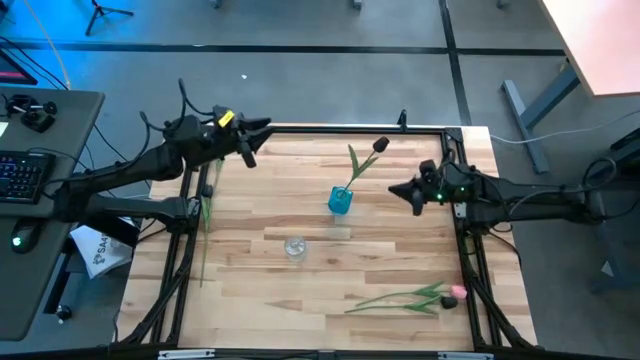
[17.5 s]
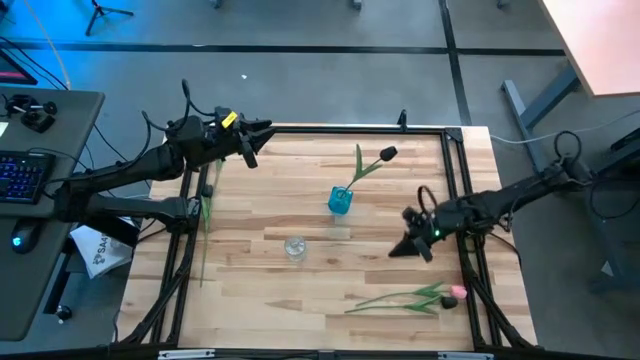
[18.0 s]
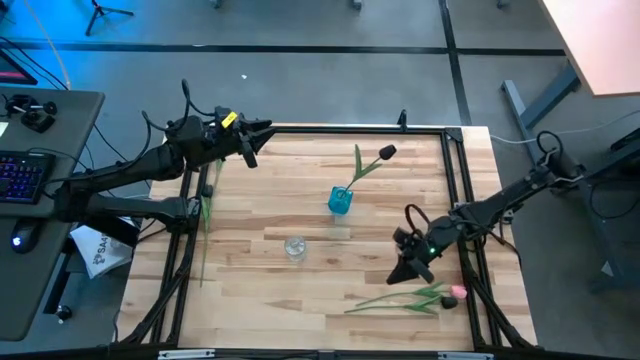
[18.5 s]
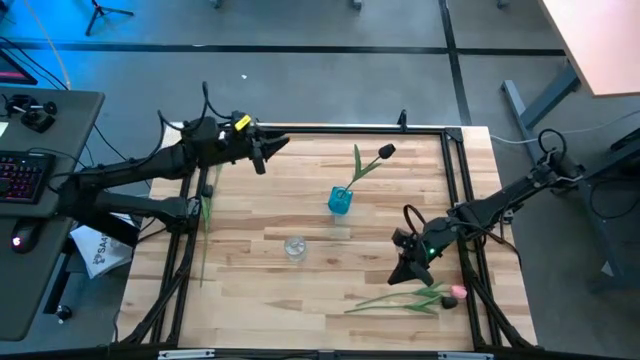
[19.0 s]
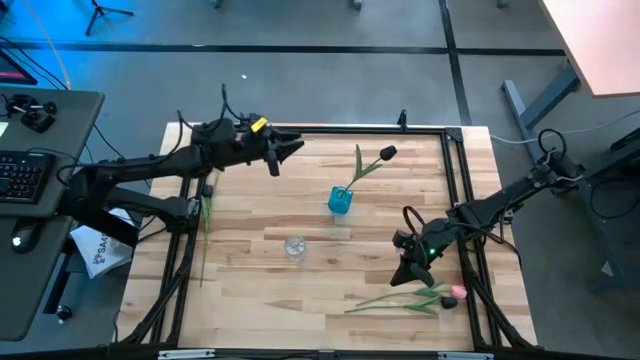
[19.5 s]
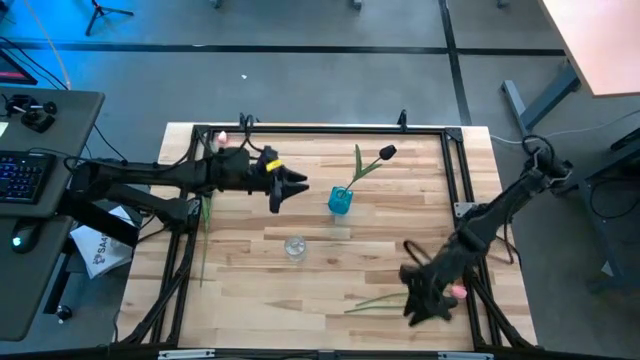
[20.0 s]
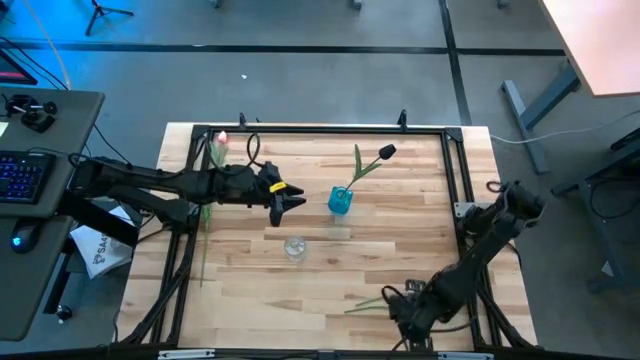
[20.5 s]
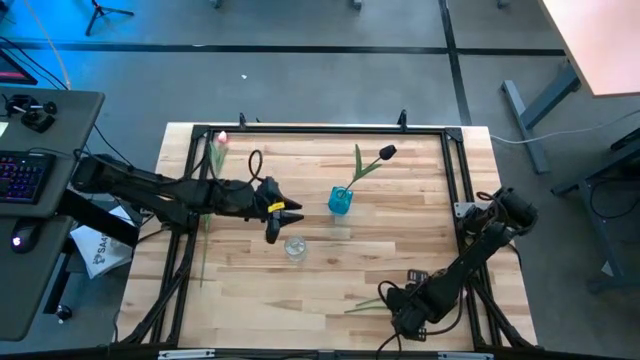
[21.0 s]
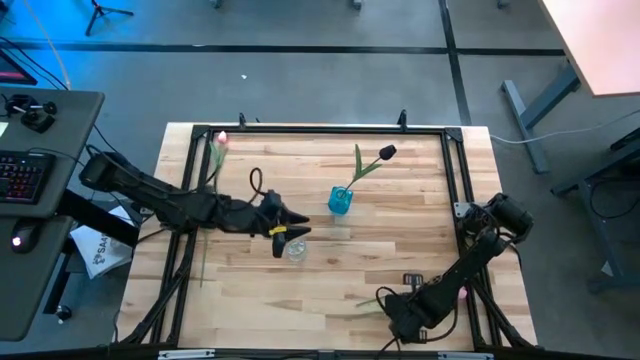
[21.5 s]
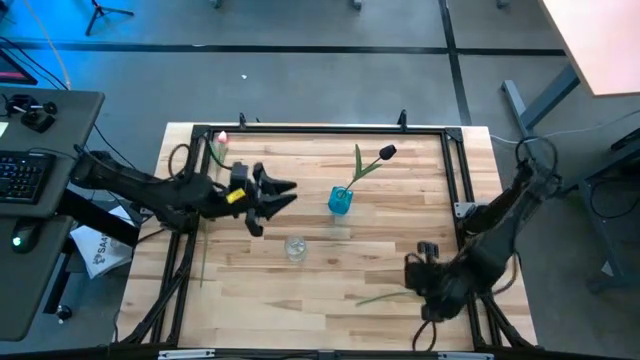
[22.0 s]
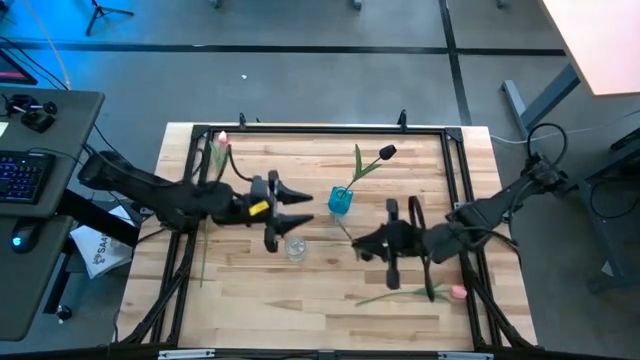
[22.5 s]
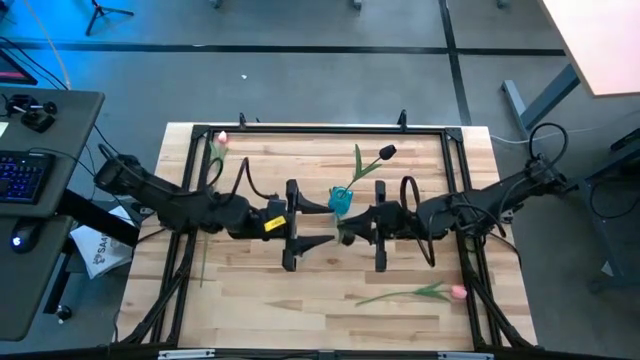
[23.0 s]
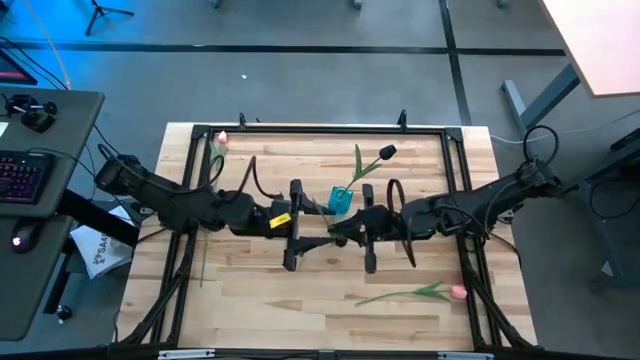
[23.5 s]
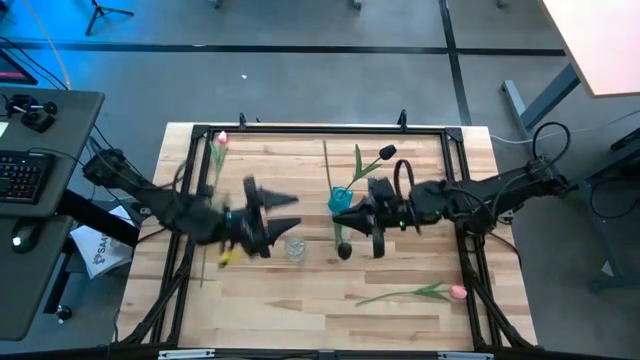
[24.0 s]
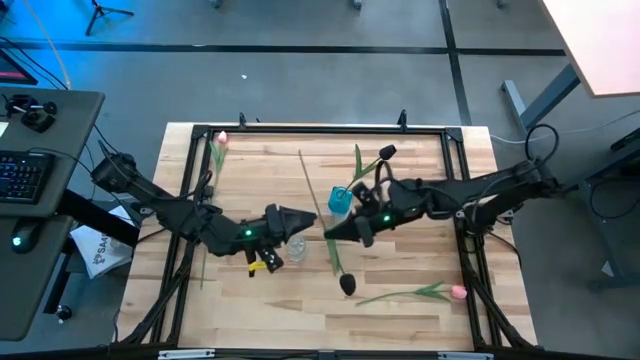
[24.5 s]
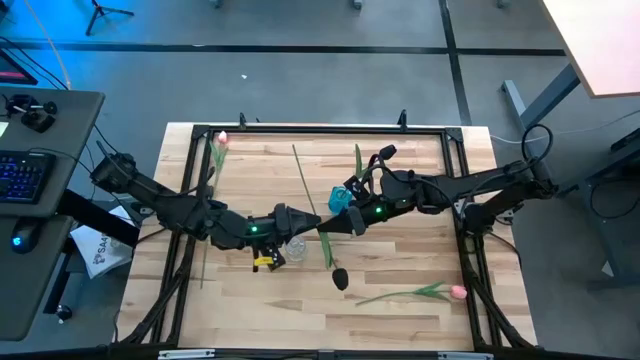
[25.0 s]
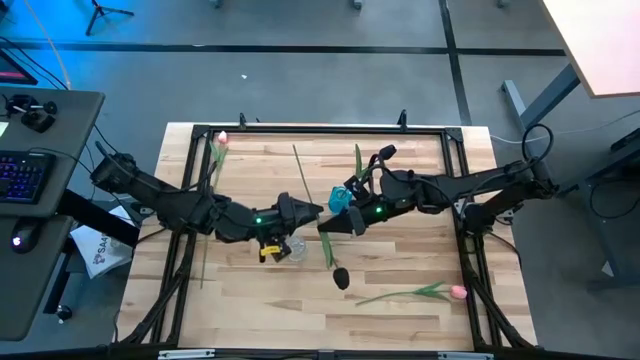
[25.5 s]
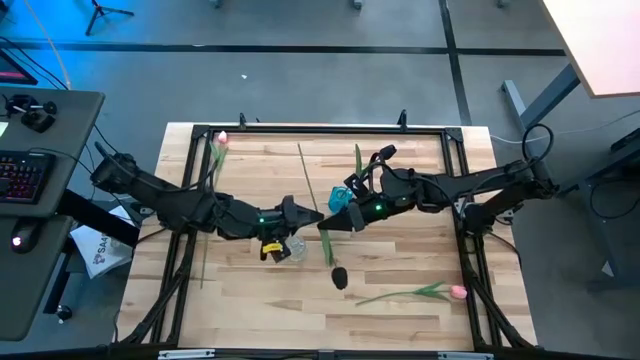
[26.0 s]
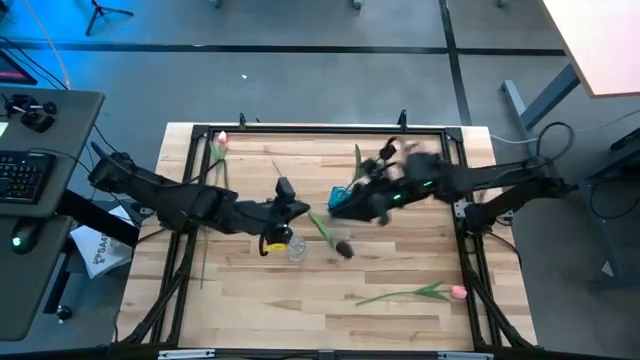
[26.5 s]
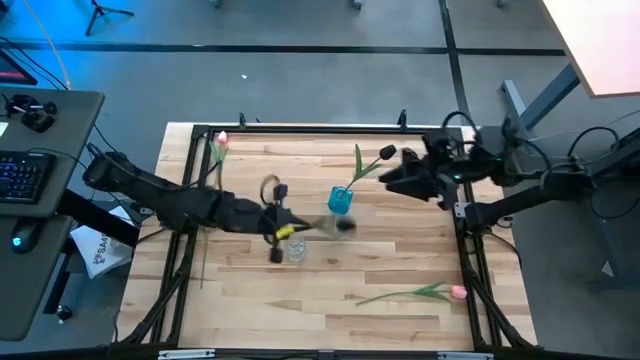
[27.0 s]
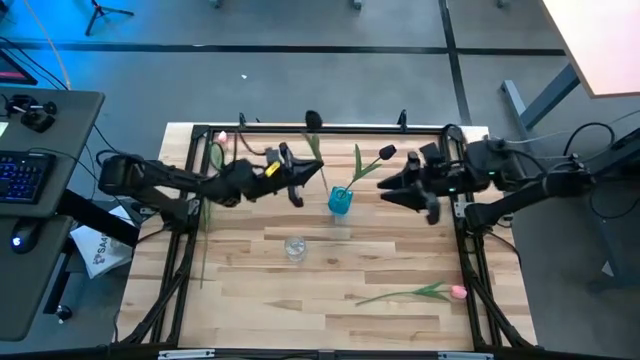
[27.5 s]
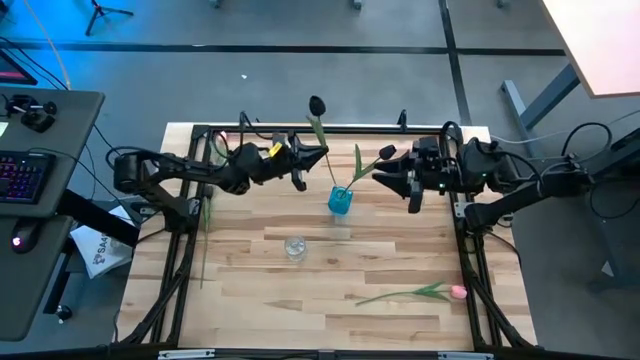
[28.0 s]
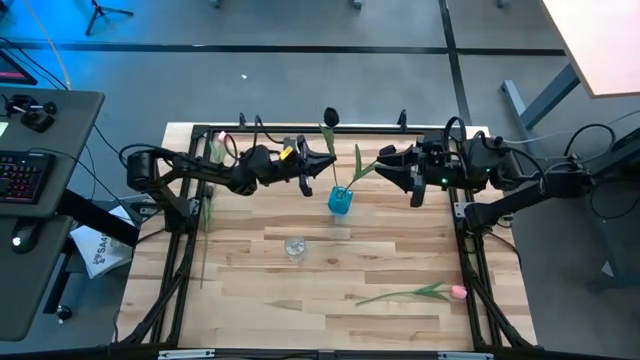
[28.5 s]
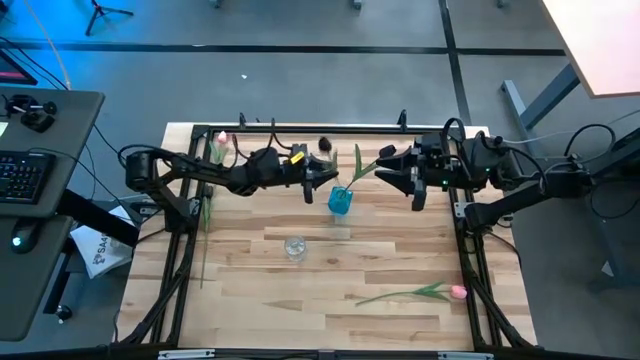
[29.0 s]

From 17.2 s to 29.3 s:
Task: Sort flowers into vase by color
Put the bottom black tulip into the blue vase

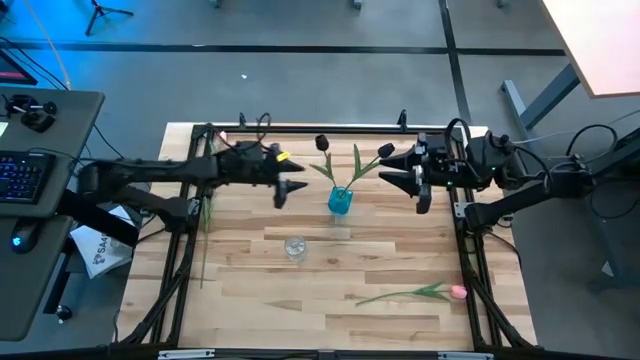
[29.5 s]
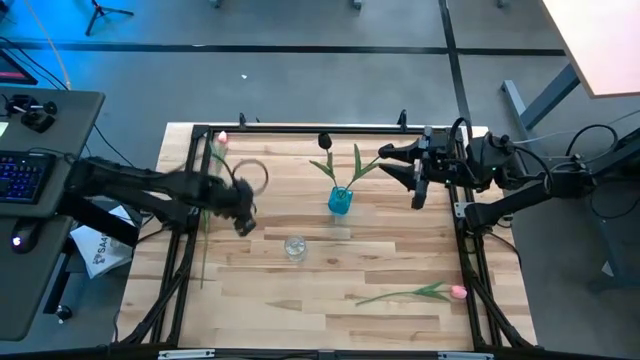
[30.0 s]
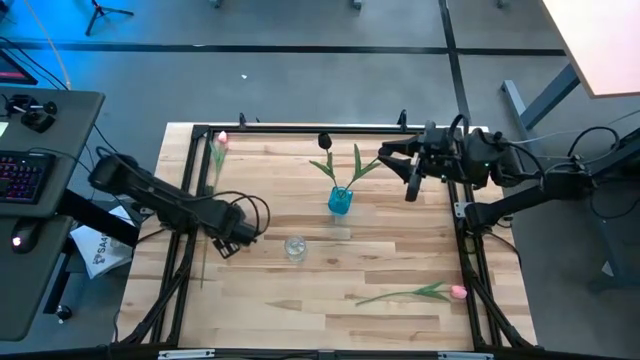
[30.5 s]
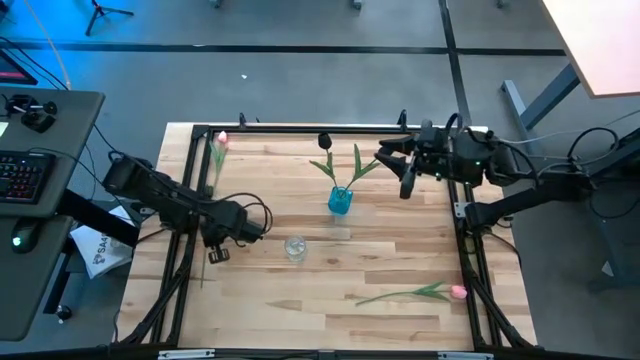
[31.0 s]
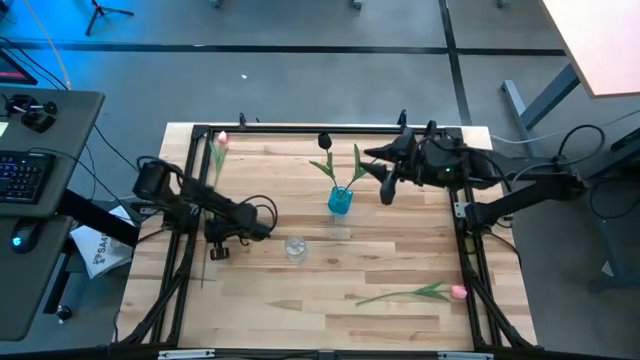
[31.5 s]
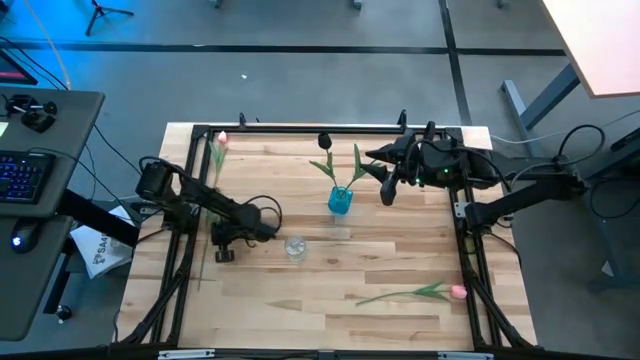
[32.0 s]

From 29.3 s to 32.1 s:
Put the black tulip into the blue vase

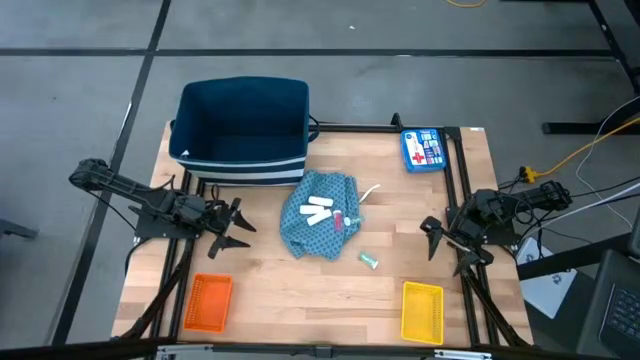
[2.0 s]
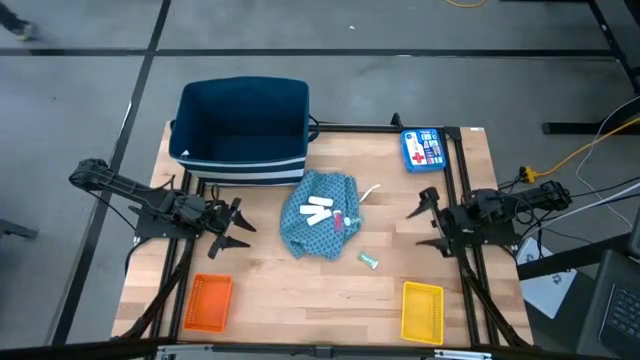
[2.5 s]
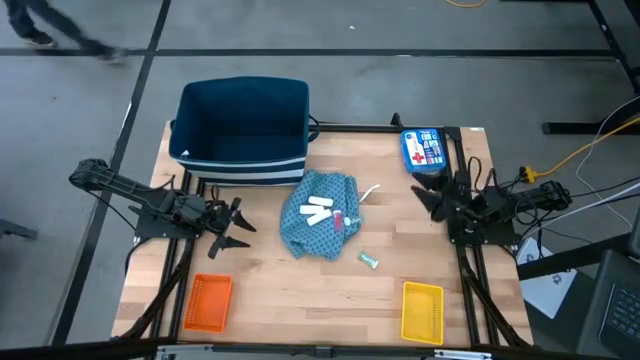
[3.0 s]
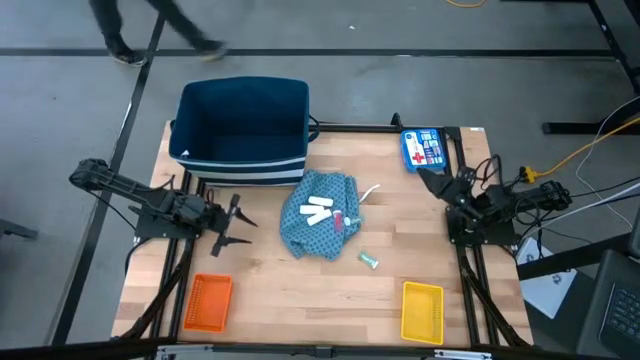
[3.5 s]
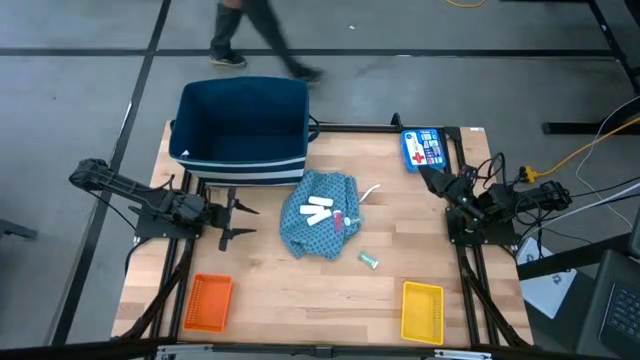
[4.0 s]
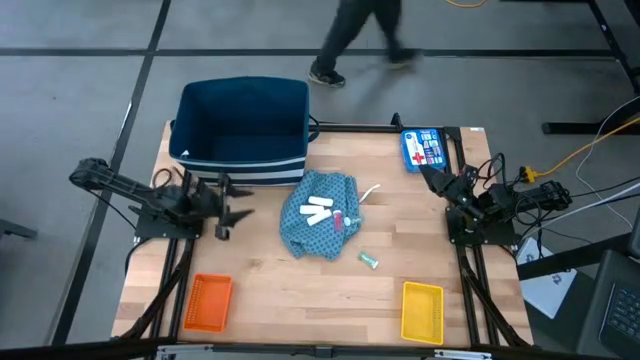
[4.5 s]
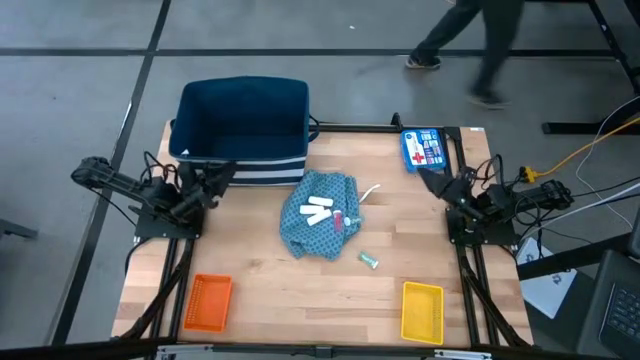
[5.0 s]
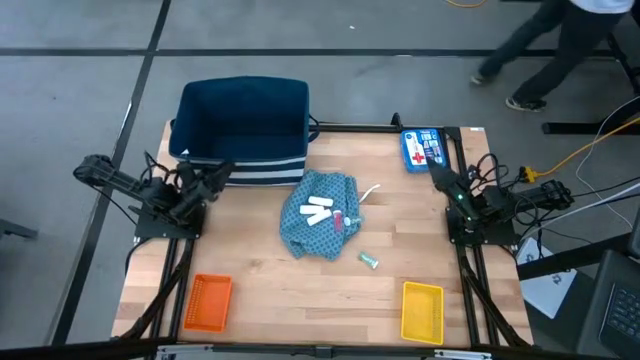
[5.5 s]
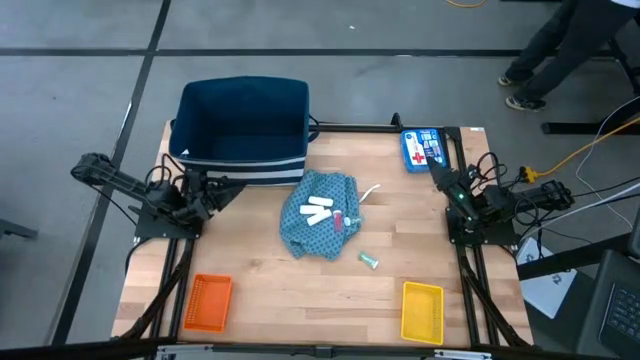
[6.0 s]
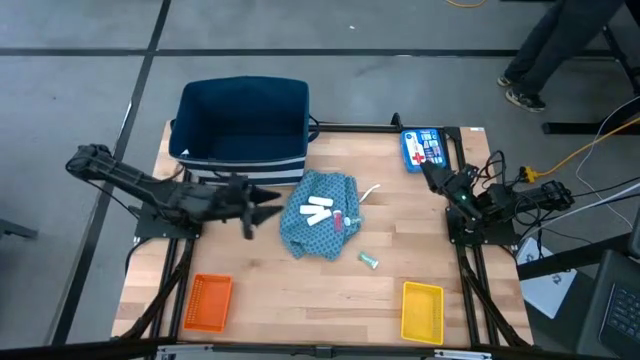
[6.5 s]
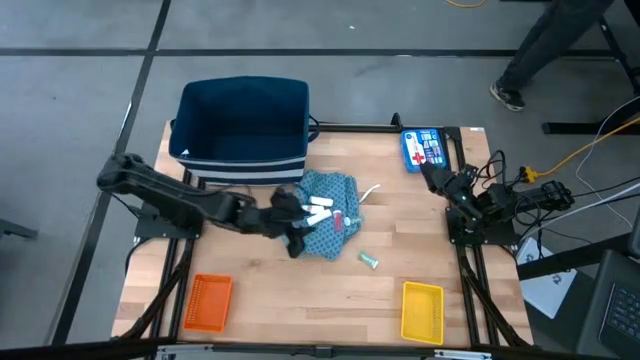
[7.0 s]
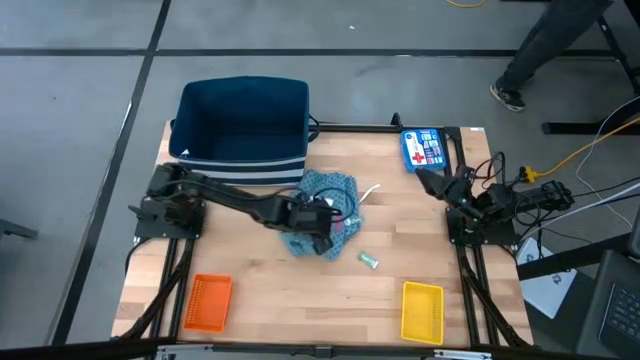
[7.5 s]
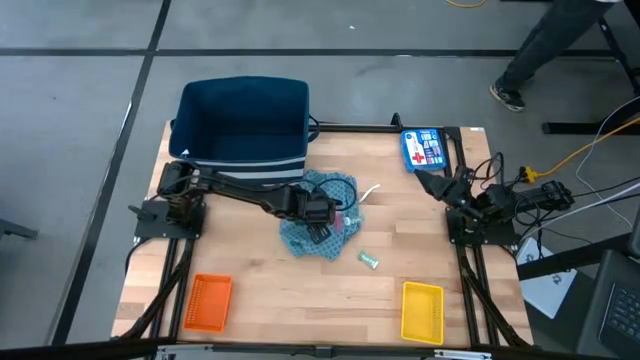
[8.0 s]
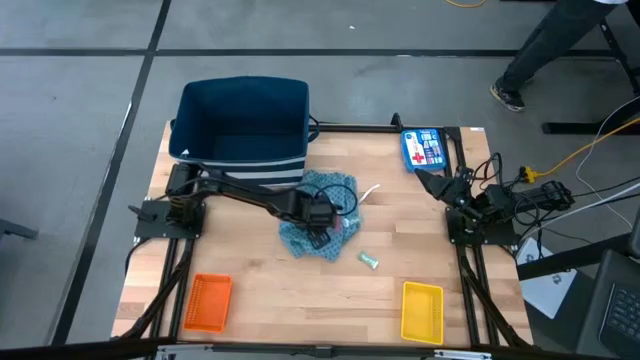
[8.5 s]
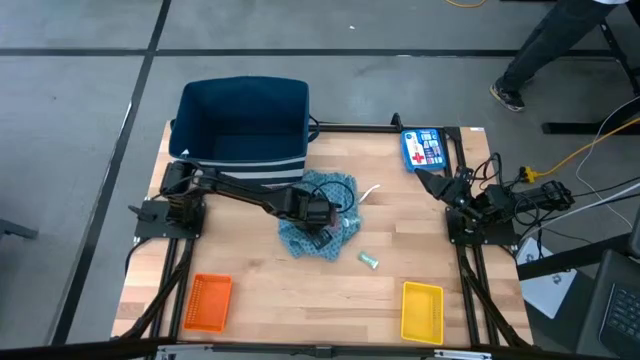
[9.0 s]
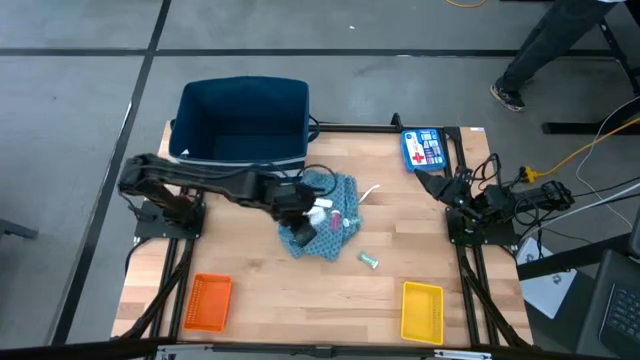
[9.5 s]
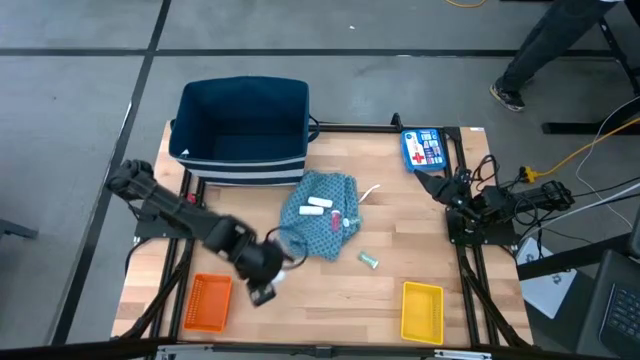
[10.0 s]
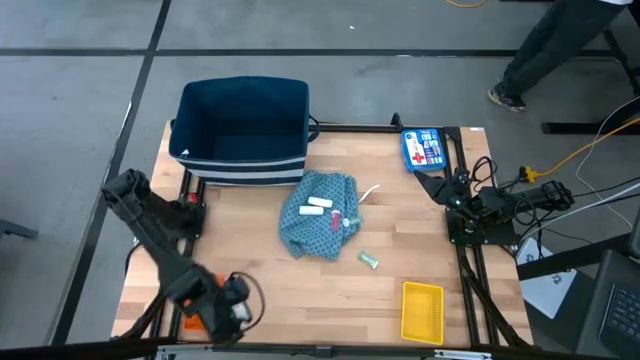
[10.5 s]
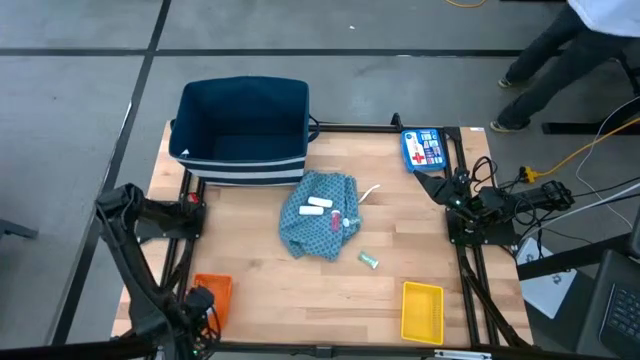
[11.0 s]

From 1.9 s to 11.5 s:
Task: Pick & Place Medicine items
Put the bottom white rolled gauze into the orange bin
